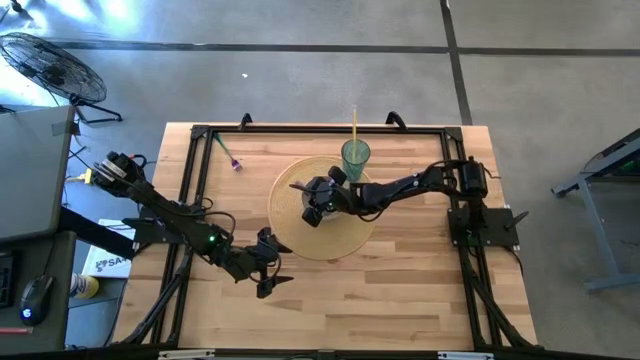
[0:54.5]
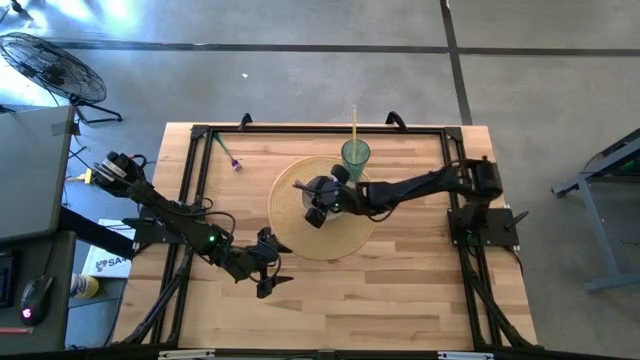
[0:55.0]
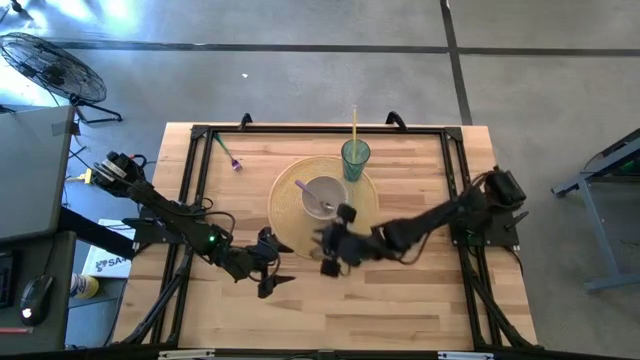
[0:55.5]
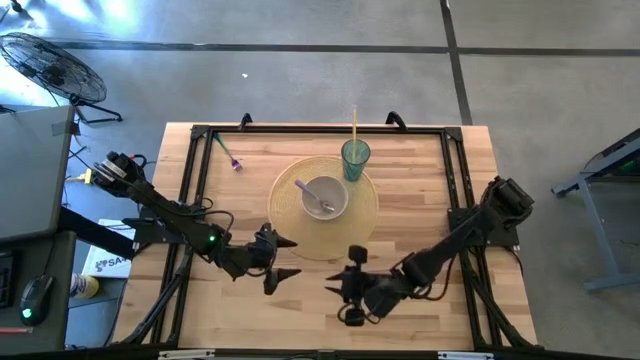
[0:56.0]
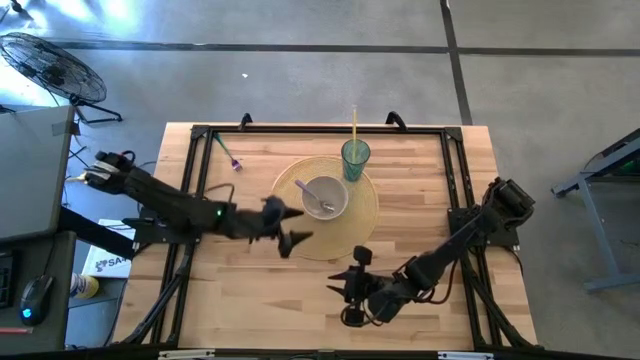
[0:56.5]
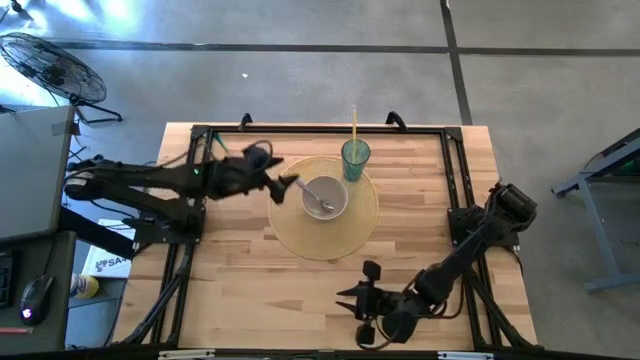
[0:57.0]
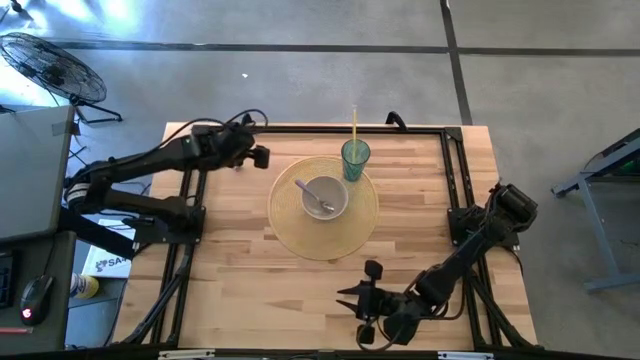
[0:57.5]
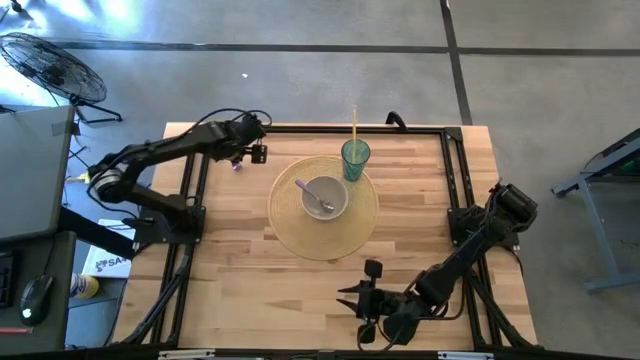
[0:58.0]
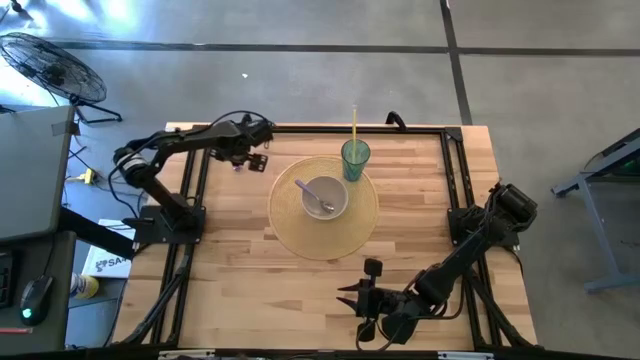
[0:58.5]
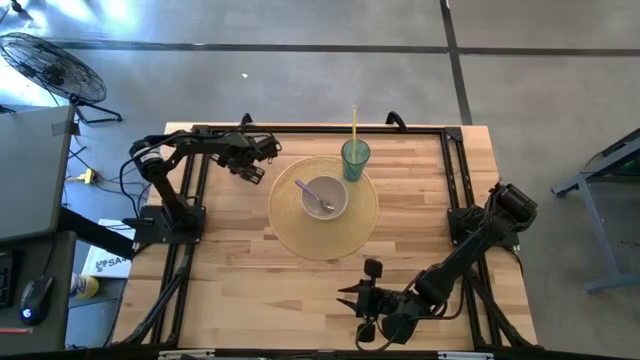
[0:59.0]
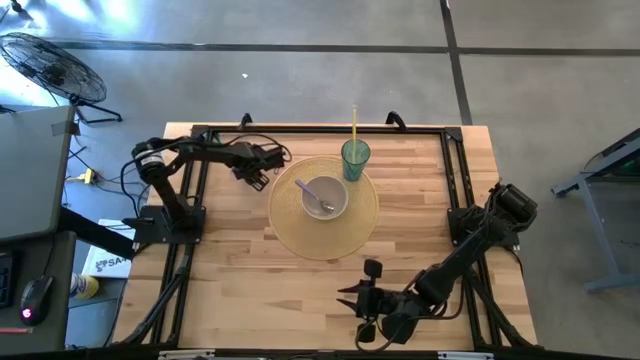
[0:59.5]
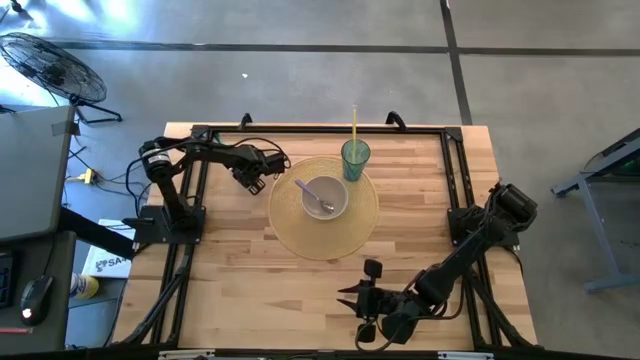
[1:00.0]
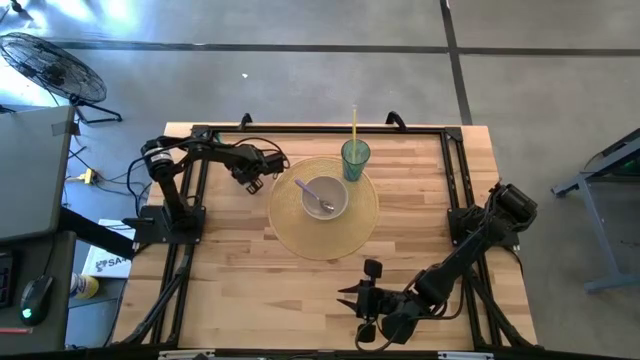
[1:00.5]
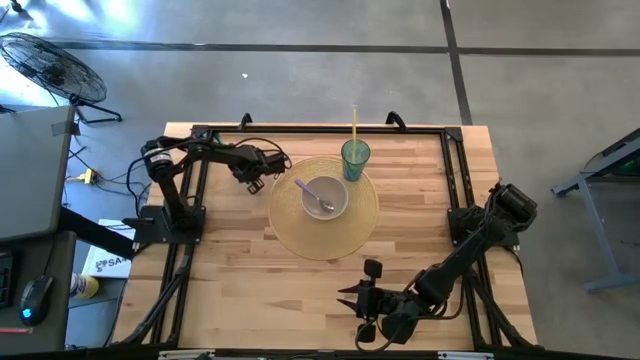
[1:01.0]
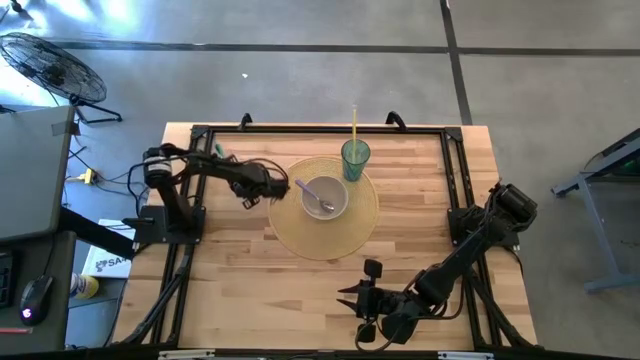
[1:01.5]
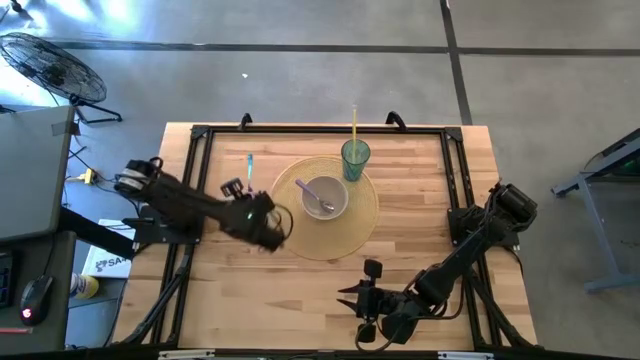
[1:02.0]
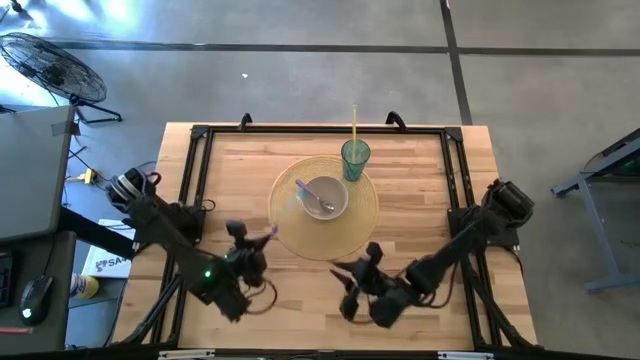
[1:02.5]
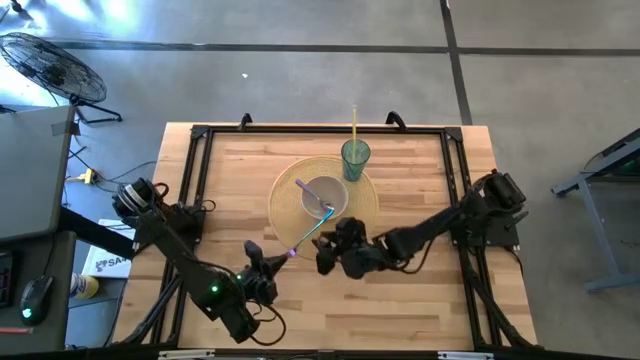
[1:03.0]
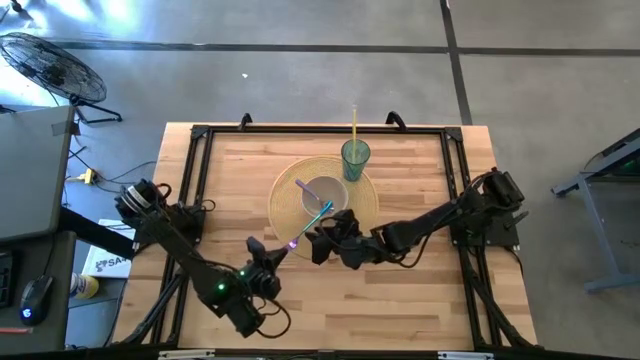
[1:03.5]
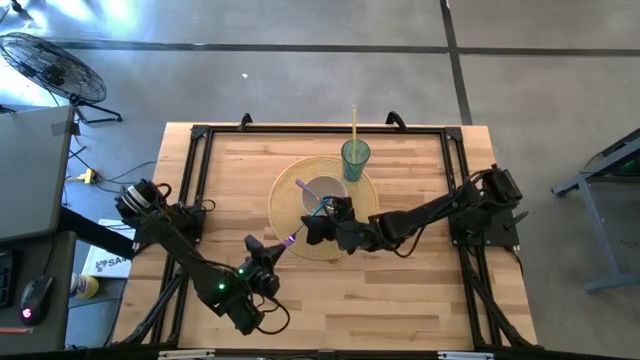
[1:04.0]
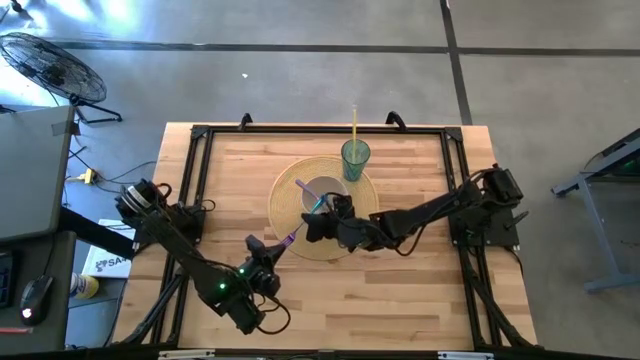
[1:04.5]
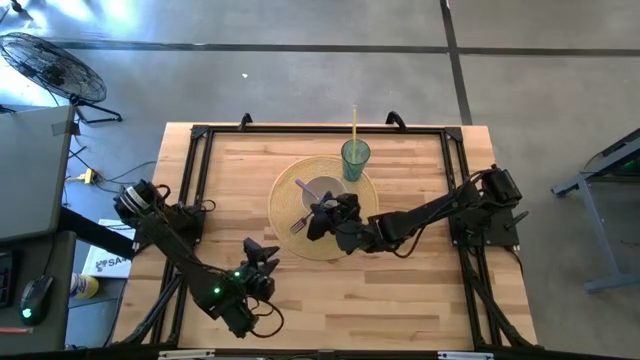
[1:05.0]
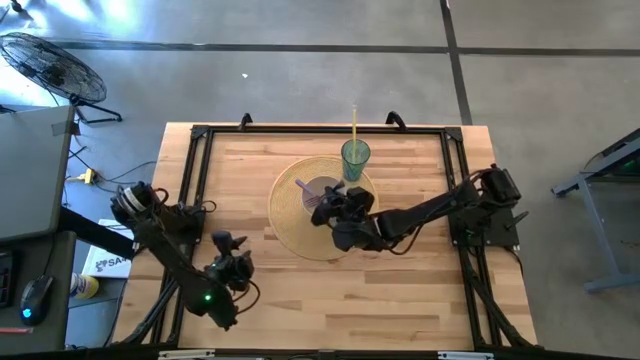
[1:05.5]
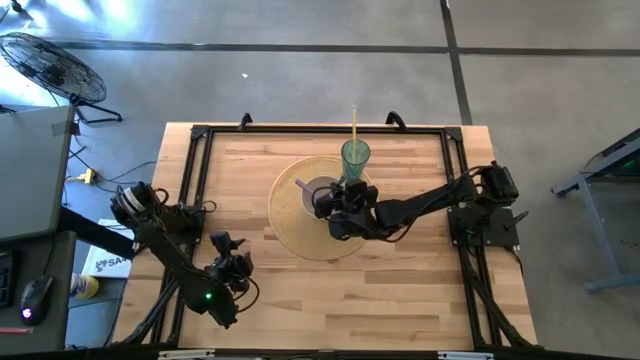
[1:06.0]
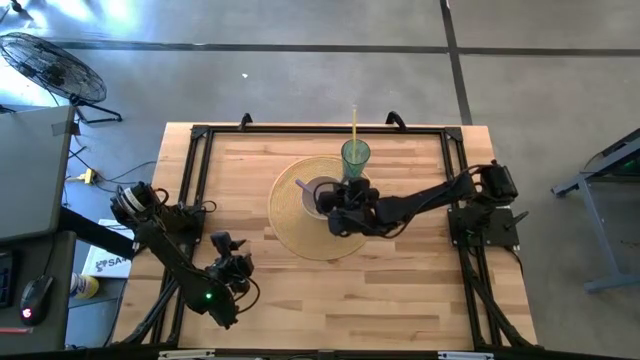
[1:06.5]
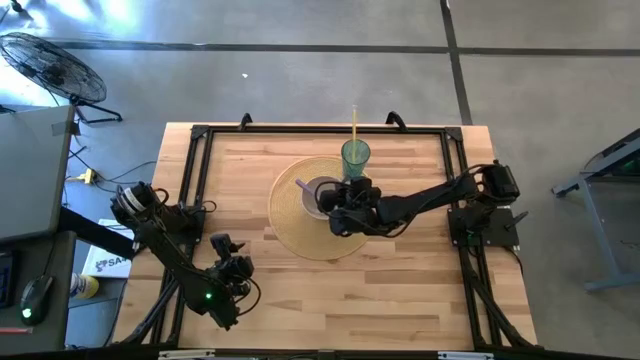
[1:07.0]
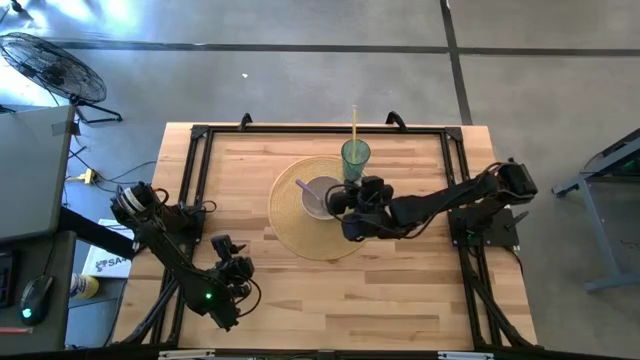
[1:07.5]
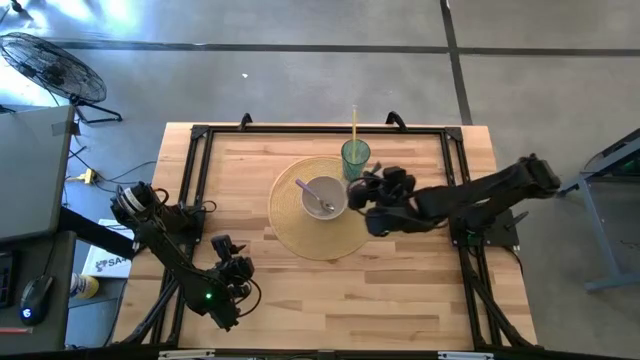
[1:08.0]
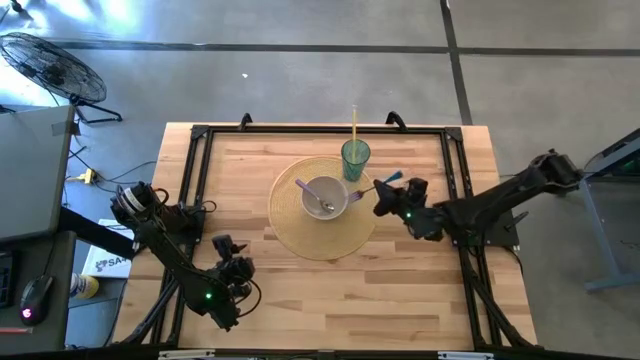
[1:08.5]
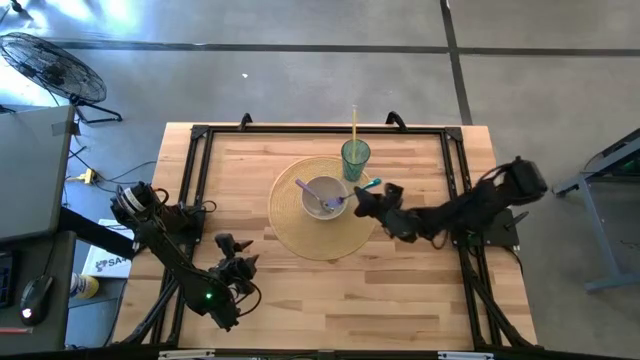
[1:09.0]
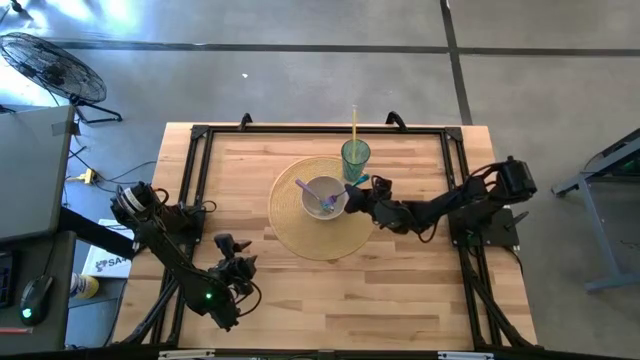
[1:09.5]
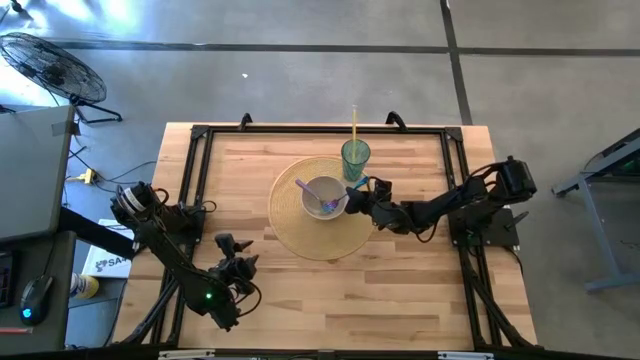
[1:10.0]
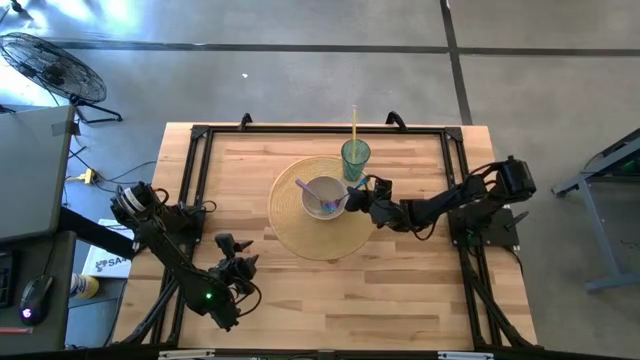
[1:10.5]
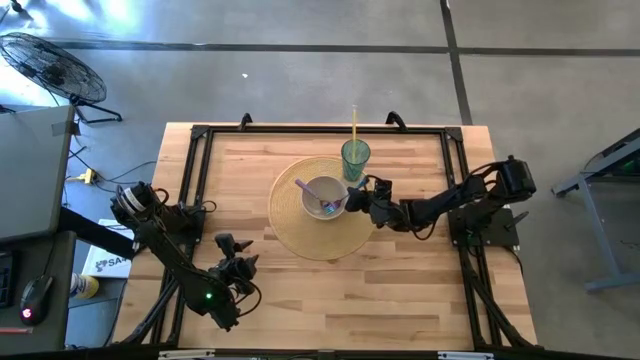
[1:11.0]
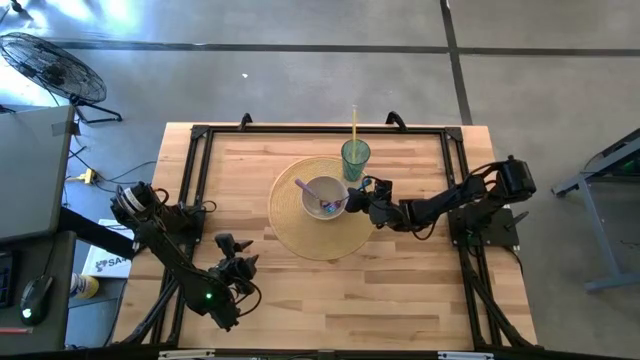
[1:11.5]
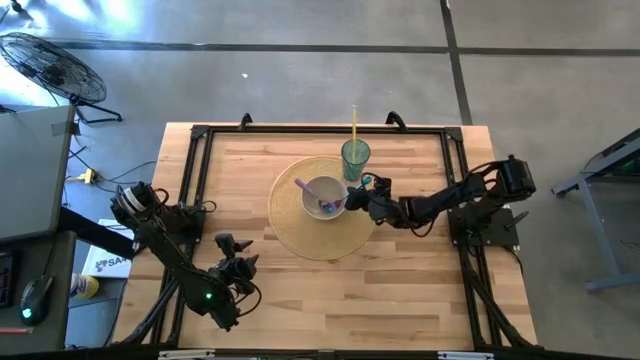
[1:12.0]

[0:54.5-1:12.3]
Task: Pick & Place Utensil
Put the blue fork into the white bowl to the right of the purple spoon

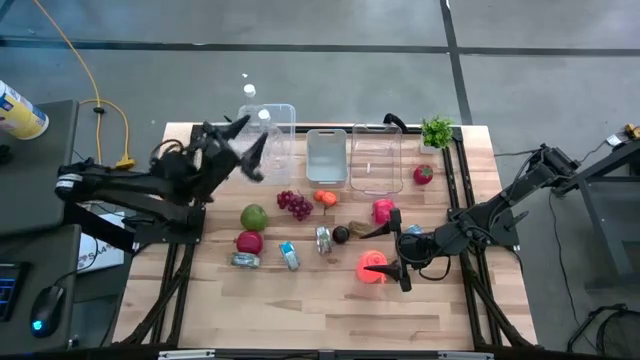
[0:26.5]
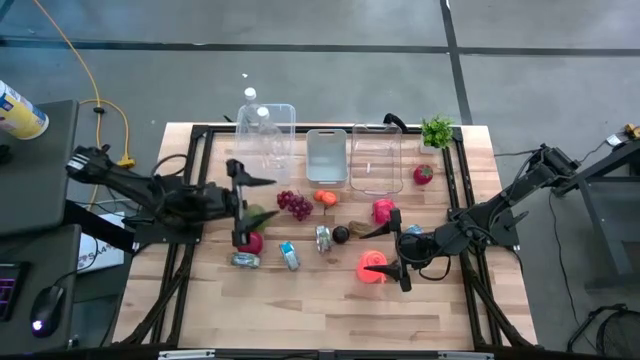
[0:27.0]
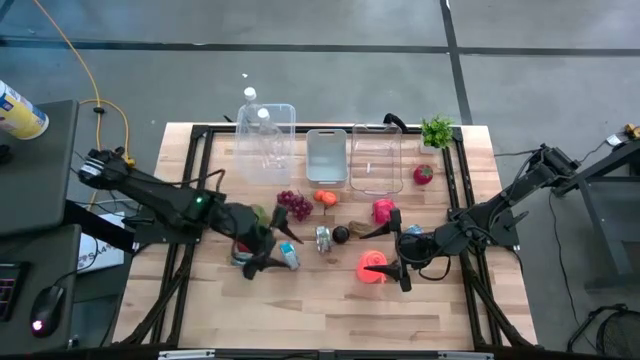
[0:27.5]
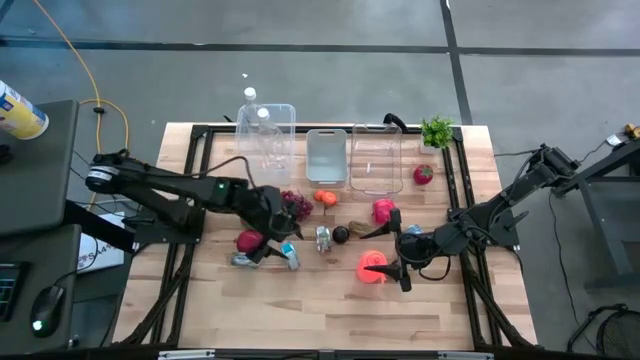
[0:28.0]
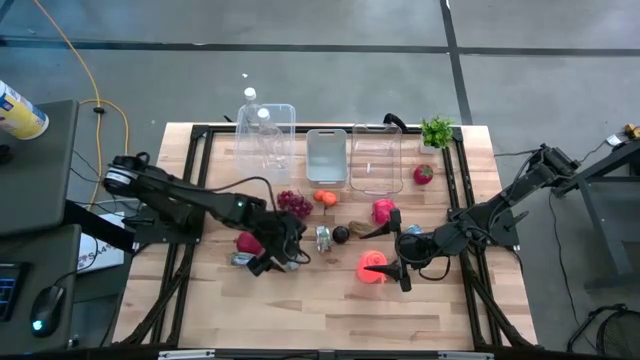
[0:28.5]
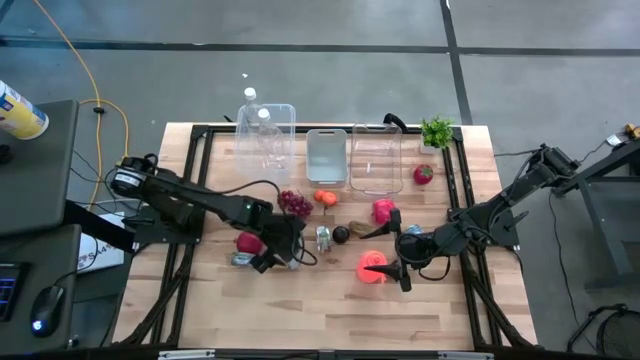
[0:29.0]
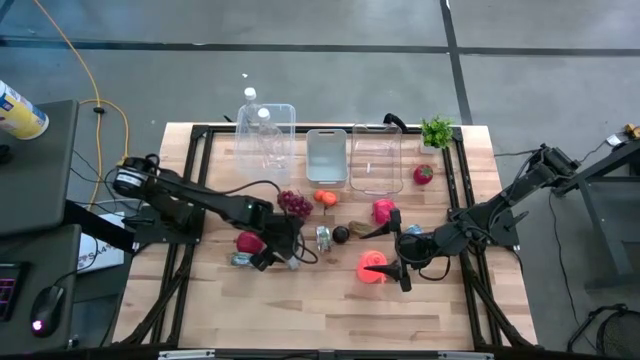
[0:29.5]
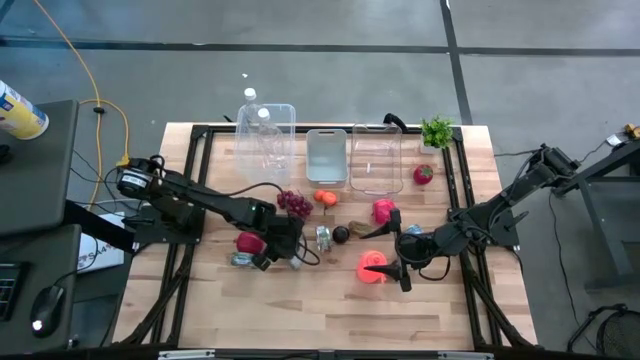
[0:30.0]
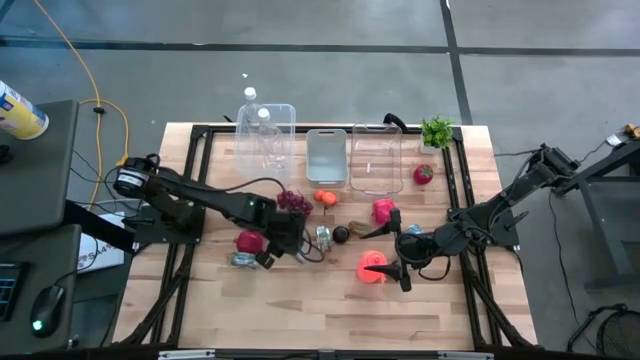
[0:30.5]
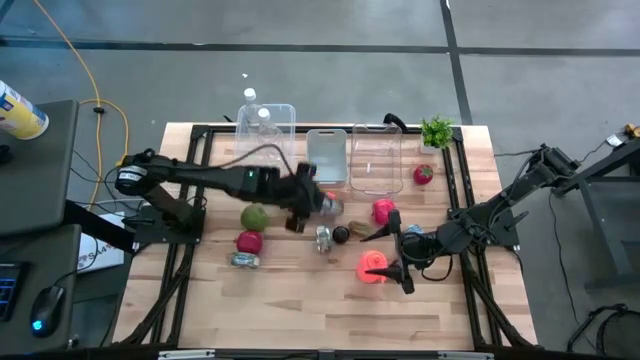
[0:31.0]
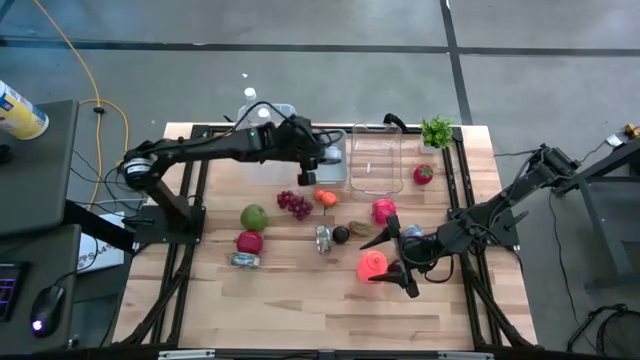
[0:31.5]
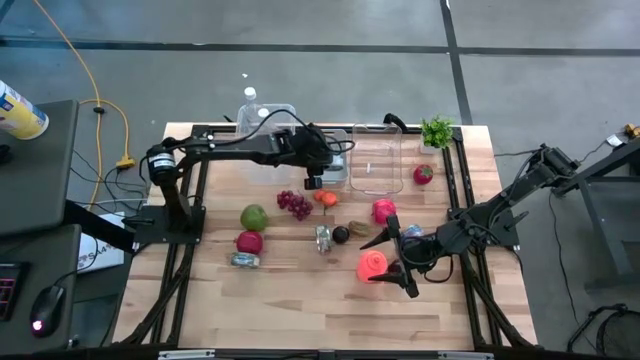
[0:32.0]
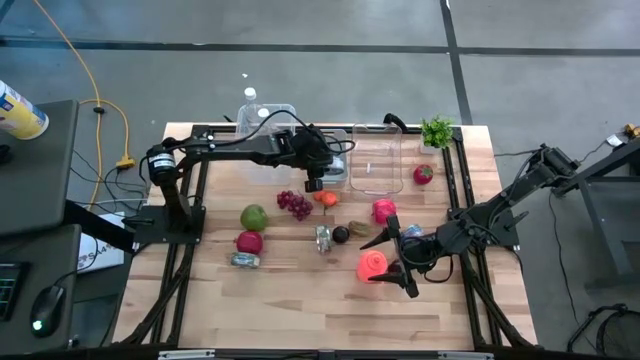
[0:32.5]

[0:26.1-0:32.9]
Task: Pick & Place Food Item
Put the blue yellow tuna can into the grey bin
